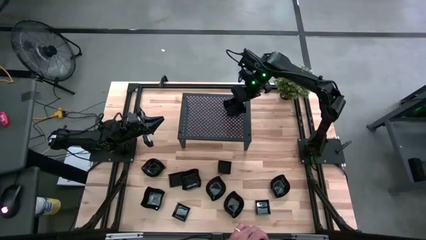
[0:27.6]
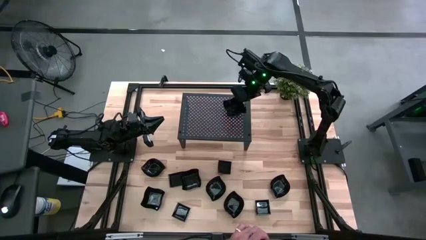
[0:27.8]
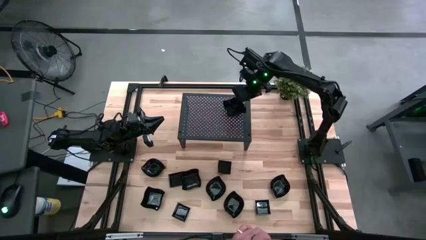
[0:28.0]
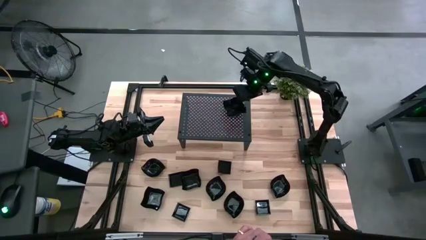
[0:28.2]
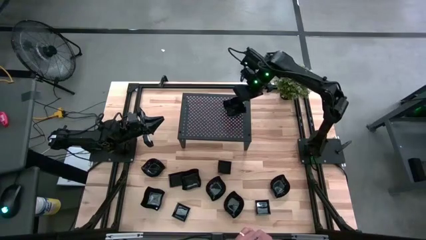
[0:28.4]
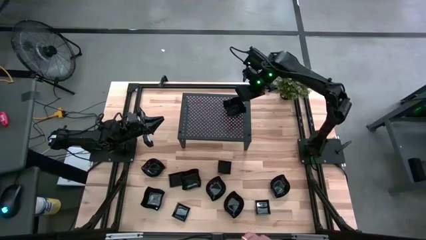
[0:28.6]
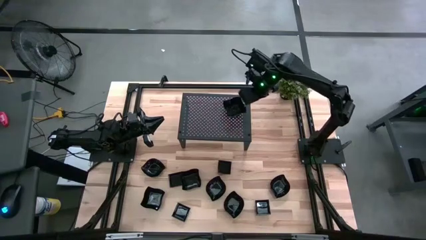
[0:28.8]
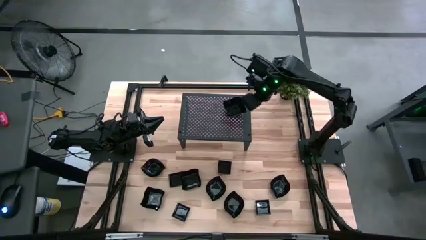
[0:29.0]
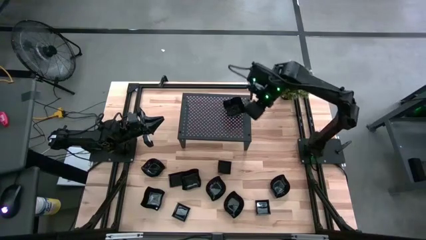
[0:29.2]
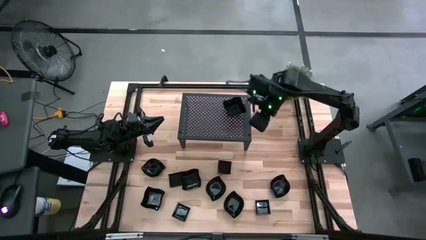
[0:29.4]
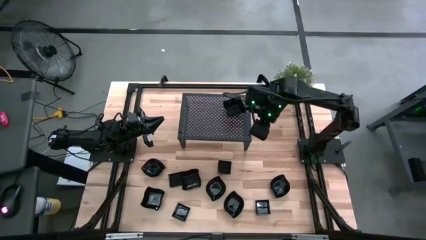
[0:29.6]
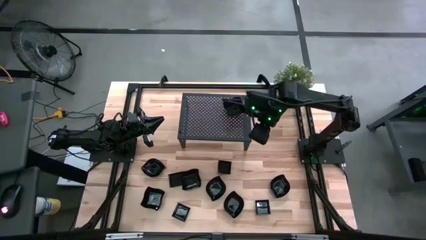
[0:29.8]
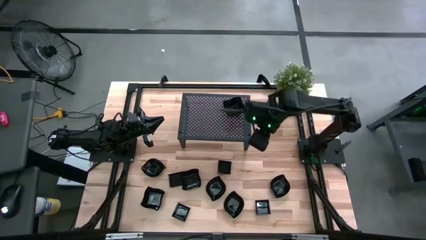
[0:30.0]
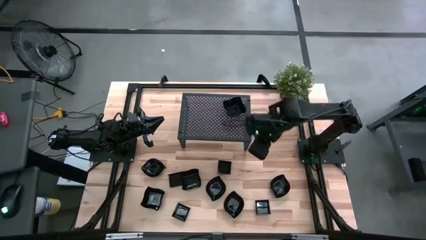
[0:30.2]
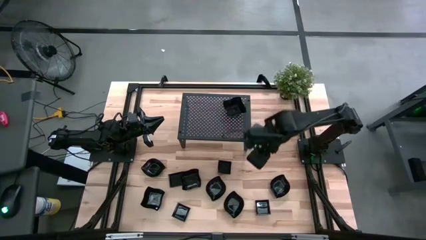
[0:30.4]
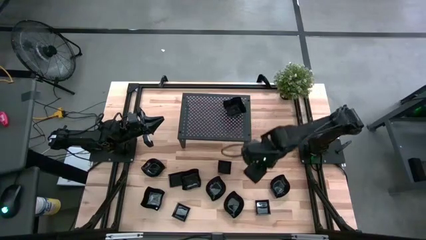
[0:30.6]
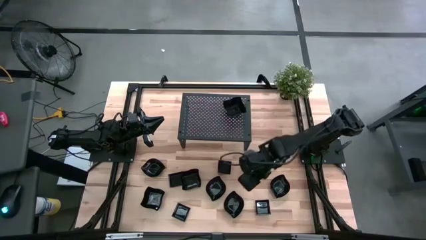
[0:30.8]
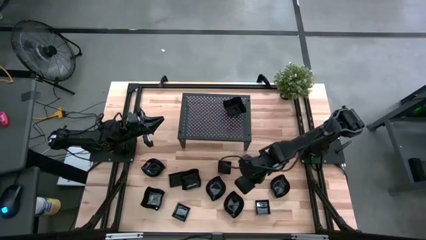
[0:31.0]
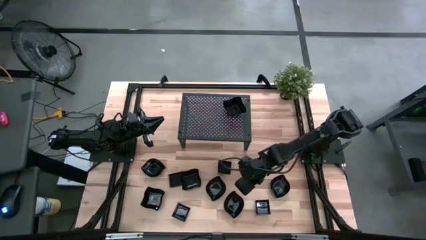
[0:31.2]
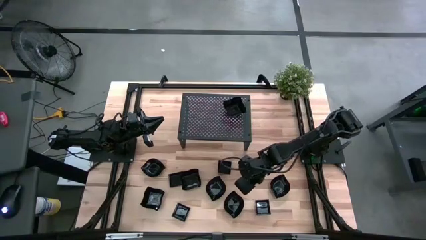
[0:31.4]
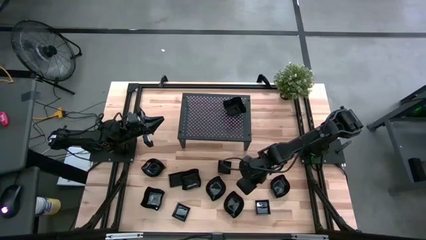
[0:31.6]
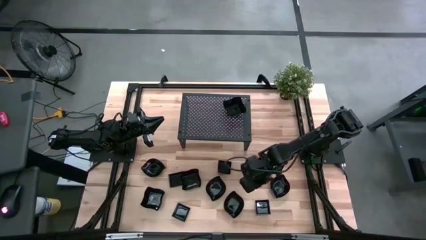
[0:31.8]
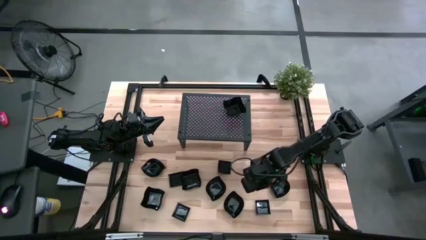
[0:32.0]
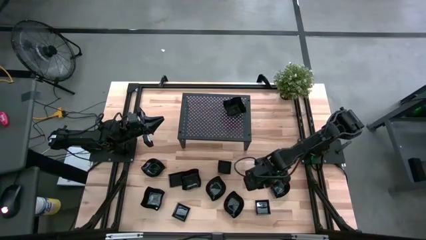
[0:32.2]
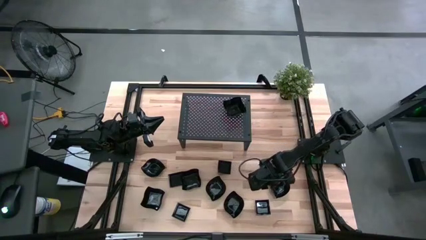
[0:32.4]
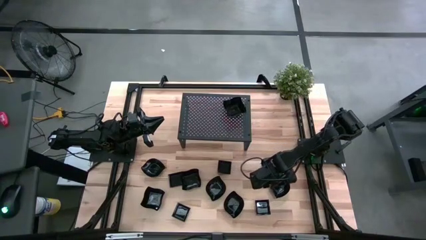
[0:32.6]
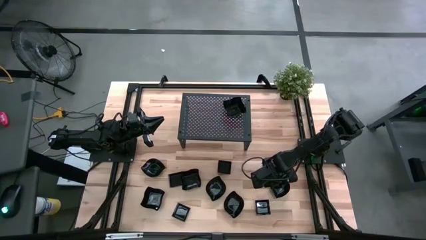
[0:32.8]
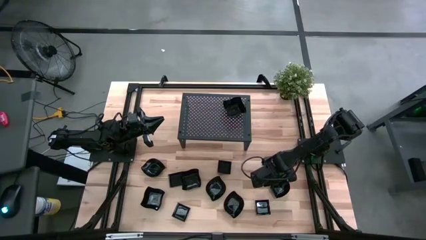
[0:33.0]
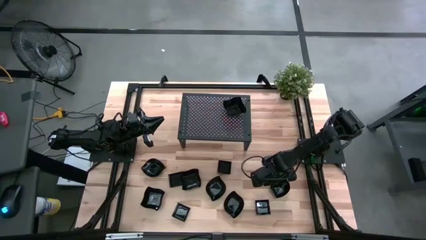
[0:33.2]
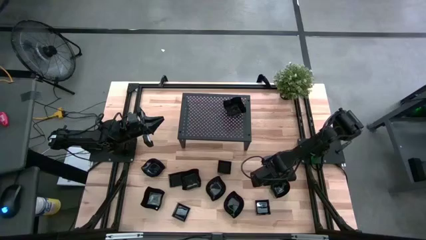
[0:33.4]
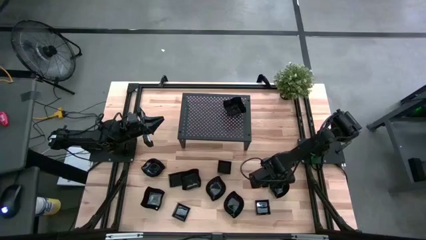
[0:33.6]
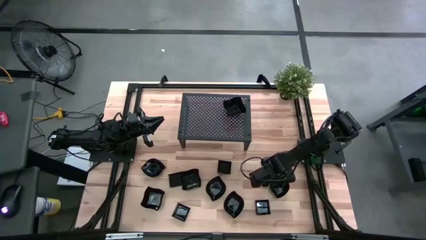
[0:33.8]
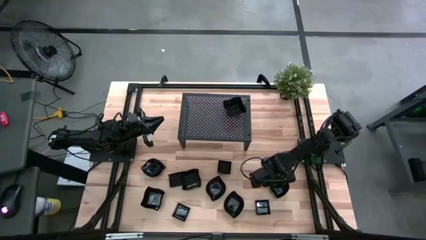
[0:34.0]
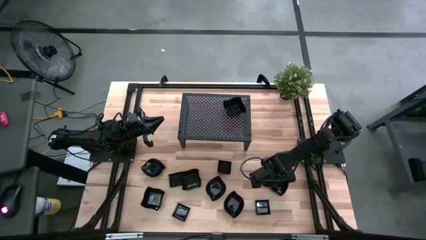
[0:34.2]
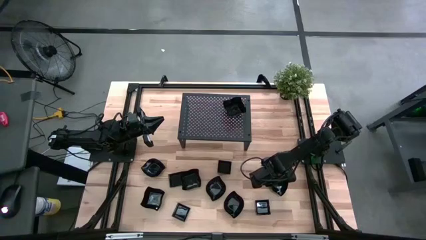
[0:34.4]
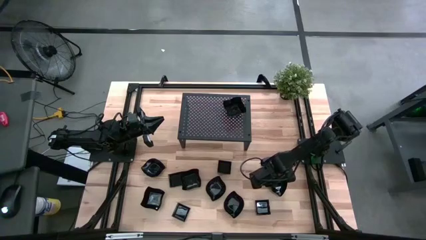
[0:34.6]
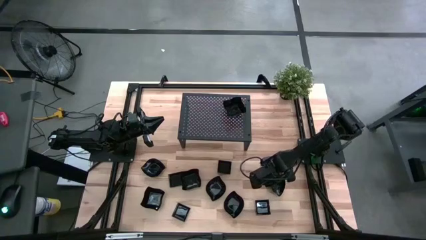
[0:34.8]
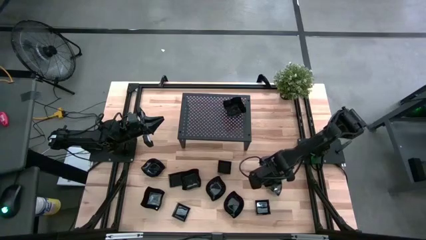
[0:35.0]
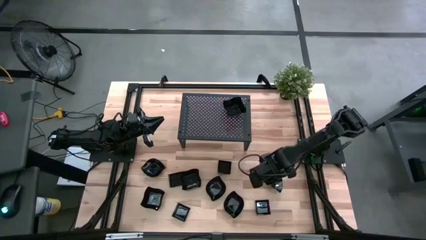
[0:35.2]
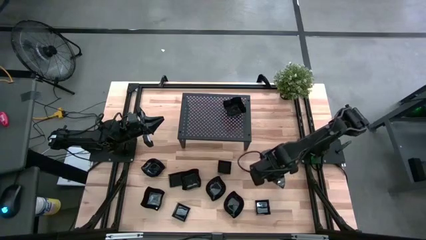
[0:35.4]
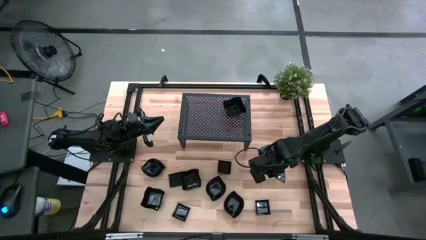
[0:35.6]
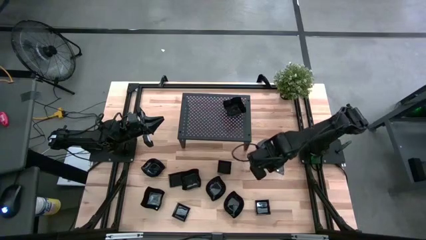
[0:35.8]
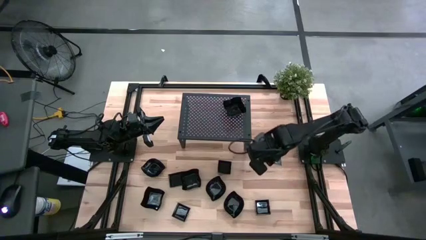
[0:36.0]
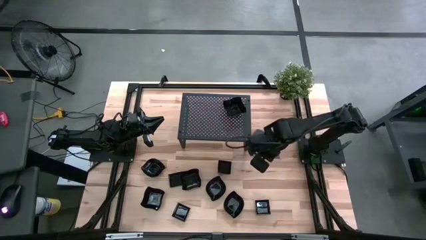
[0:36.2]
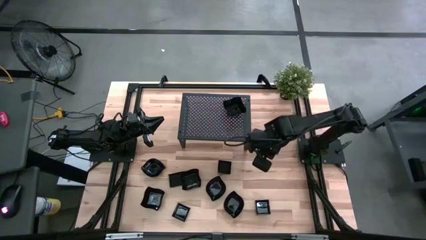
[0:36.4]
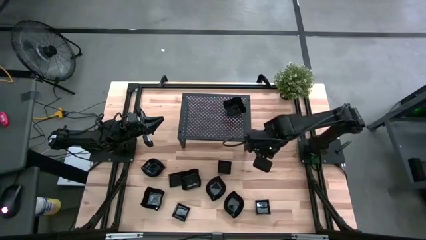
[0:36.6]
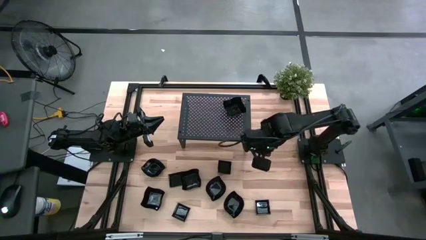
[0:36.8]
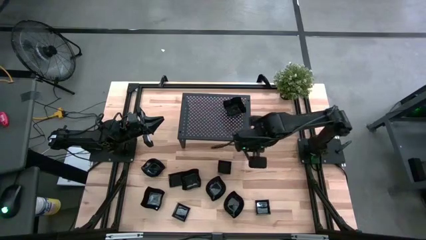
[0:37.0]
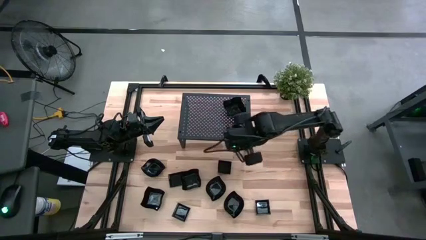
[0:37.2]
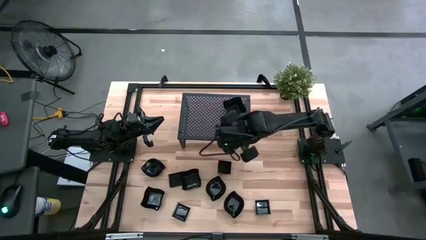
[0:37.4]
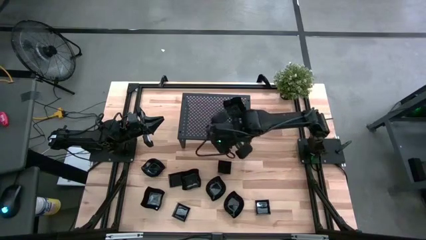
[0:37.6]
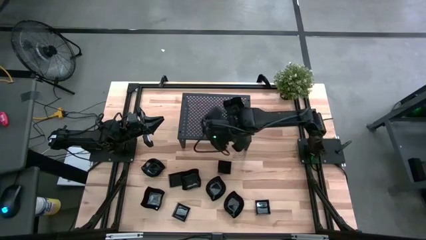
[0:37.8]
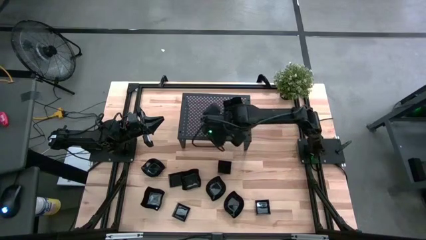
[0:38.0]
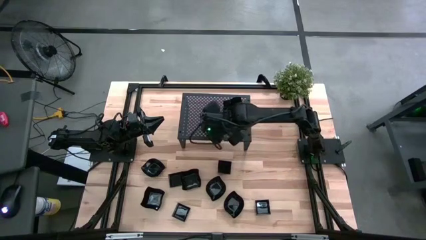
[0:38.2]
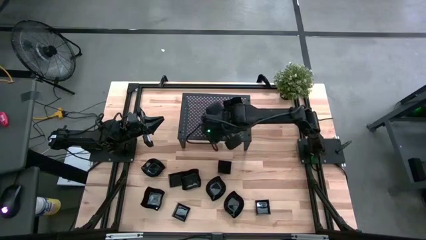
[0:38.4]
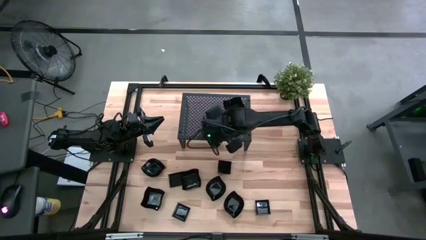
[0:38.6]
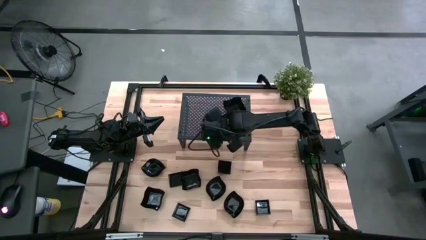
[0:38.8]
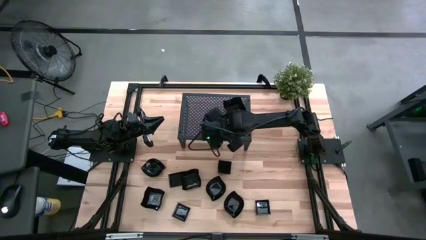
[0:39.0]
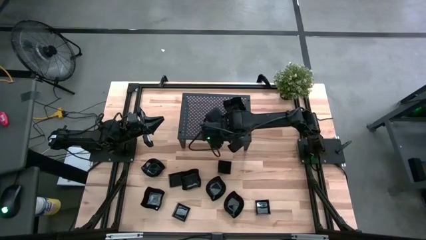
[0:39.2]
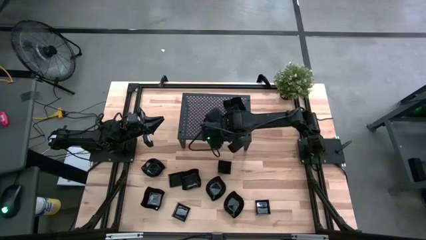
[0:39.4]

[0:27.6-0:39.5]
Task: Pick & Place Mini shaped plates
Put the black leaf-shaped plate on the shelf
